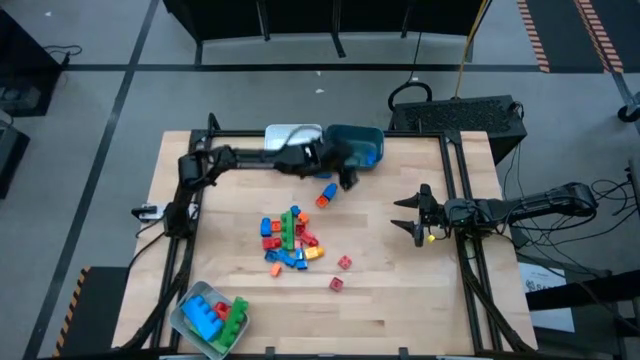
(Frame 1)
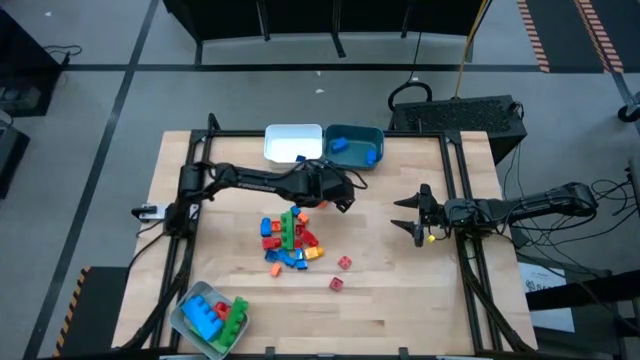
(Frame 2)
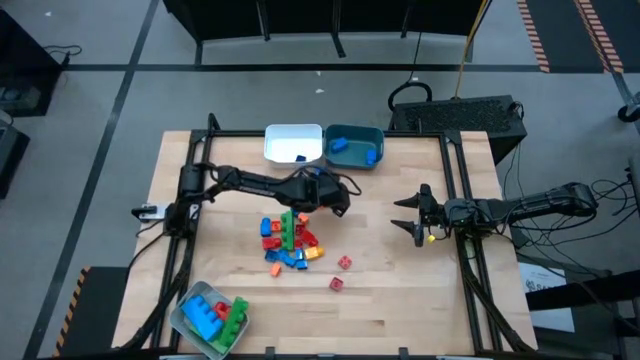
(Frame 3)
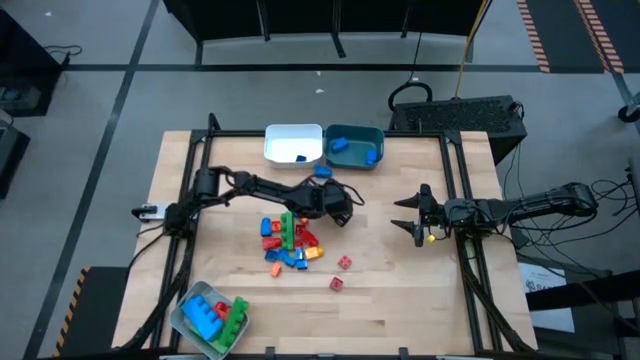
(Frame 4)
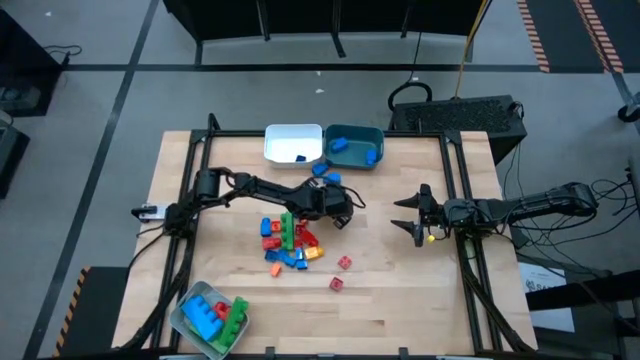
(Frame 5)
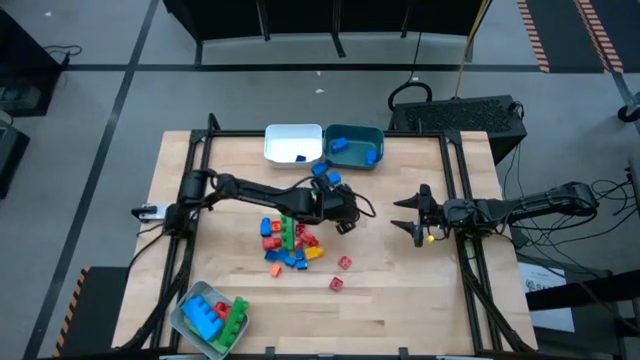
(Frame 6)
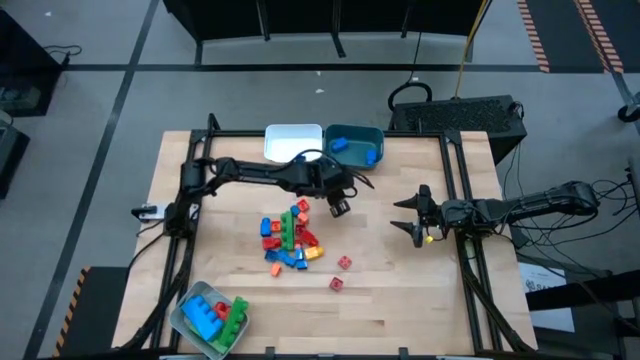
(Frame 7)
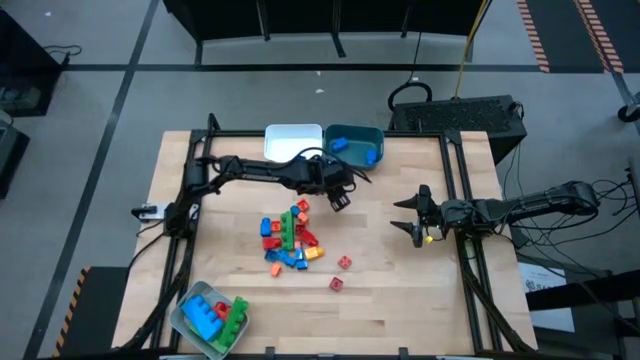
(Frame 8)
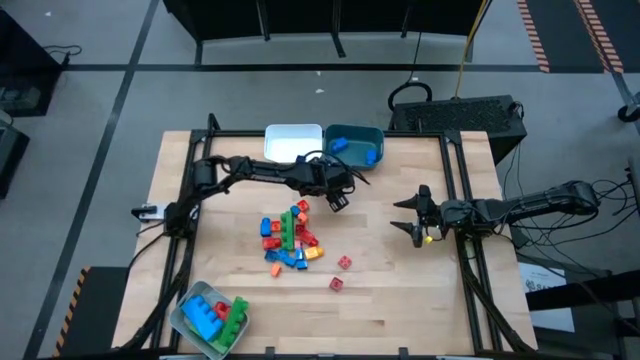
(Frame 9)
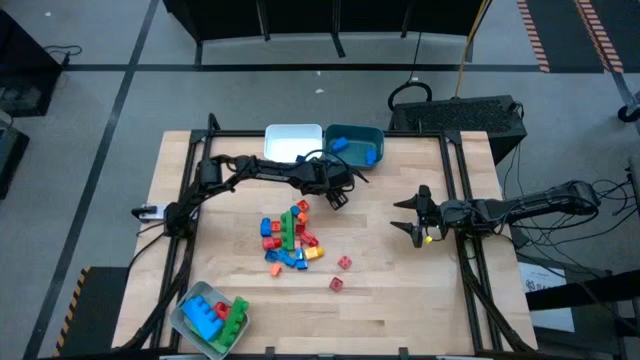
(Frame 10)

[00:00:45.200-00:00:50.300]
Task: Sort blocks by size
Put the blue 1 stud game piece into the blue bin

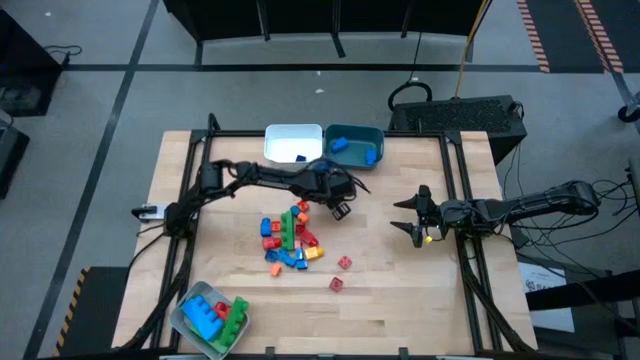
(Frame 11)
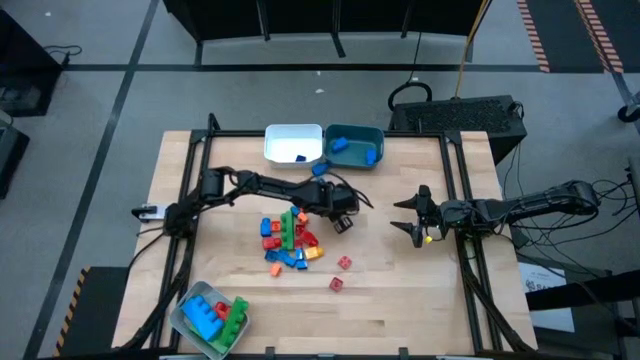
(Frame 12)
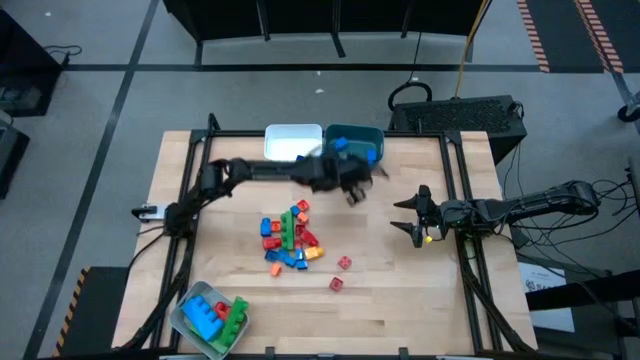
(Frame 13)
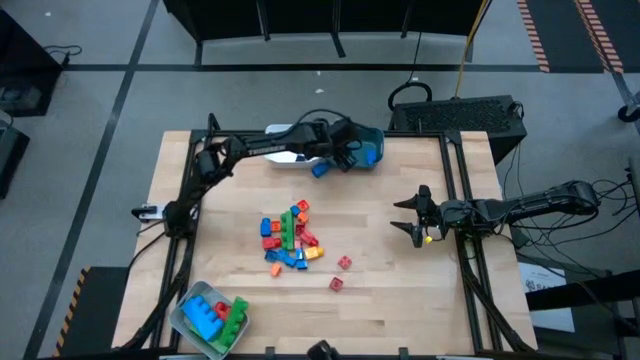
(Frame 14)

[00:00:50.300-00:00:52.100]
Put the blue 1 stud game piece into the blue bin

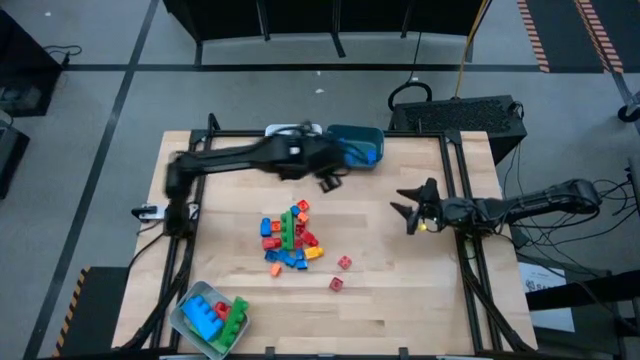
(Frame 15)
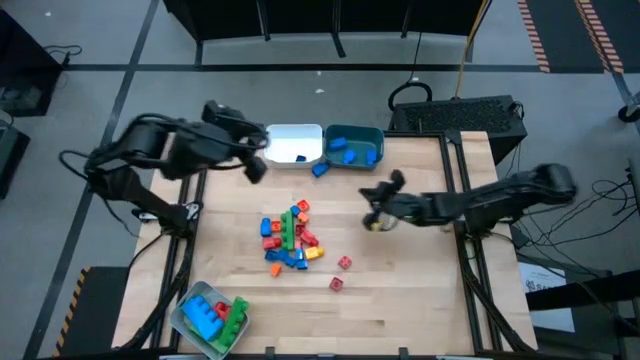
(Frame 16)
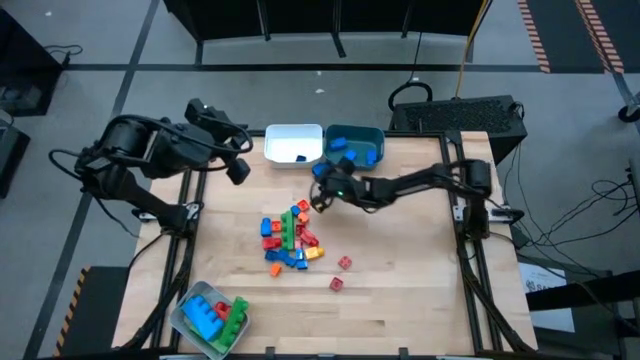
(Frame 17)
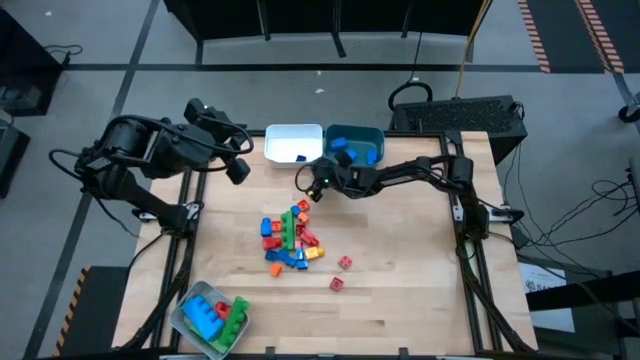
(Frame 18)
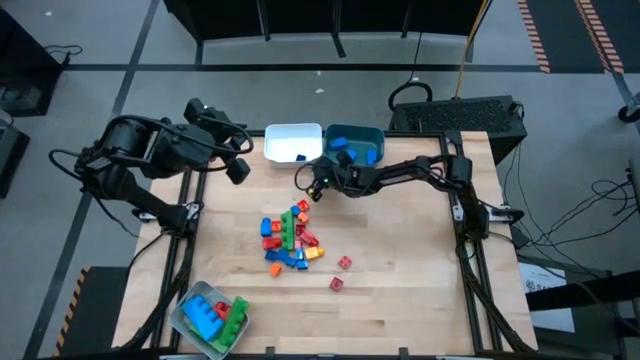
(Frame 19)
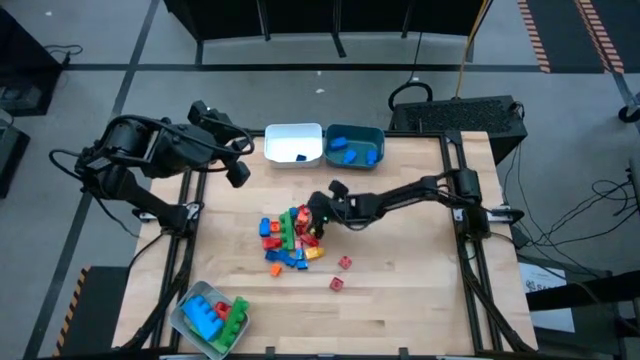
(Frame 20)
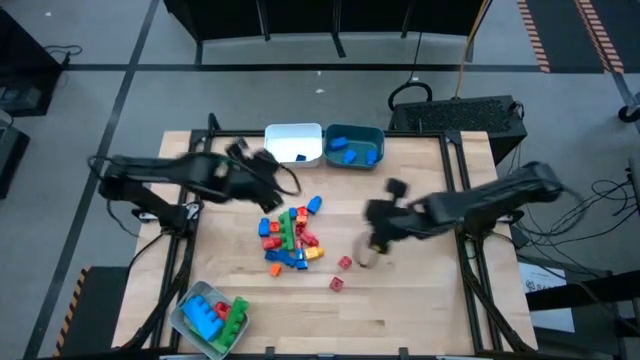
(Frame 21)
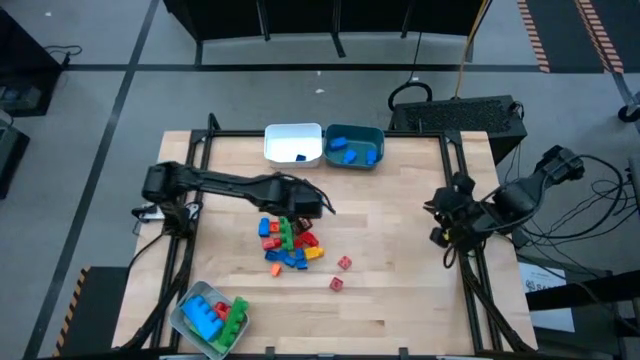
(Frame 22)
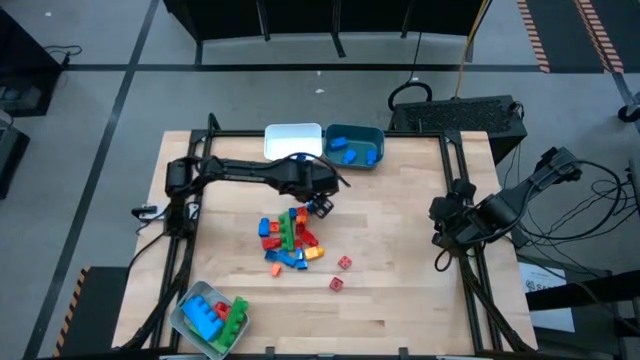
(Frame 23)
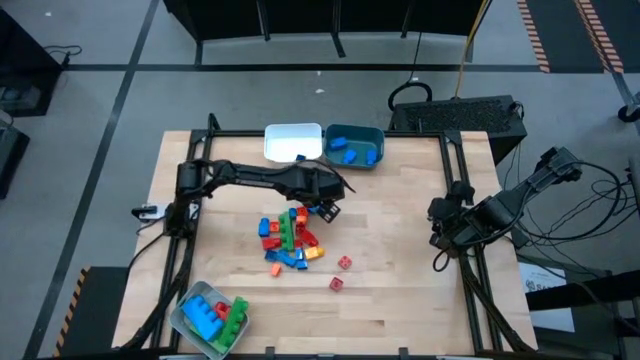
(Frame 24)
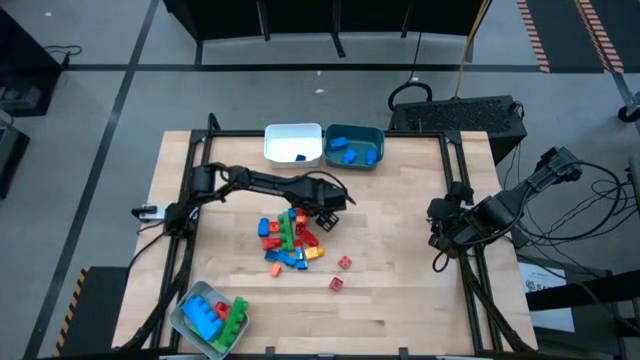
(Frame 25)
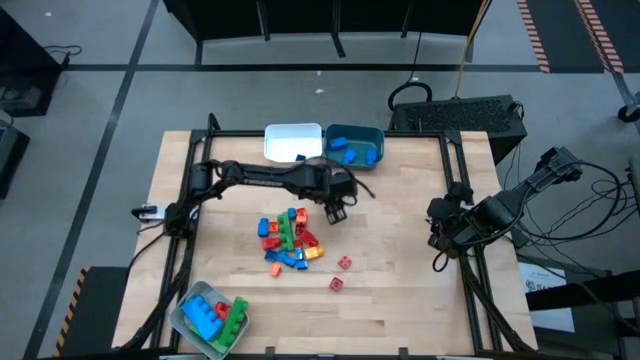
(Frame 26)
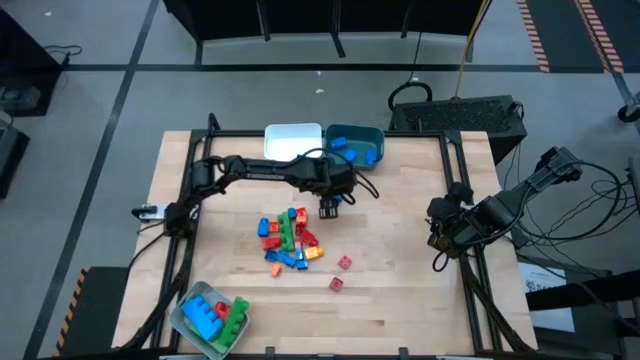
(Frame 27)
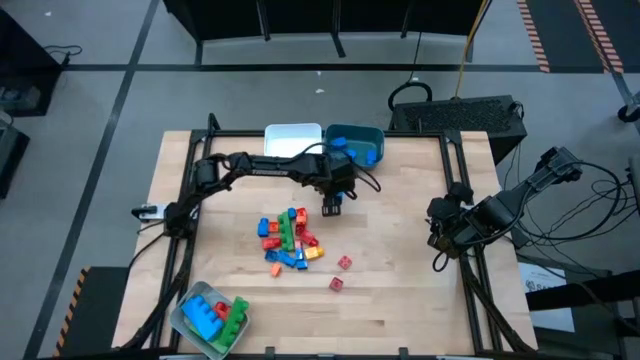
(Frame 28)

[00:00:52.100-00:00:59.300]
Put the blue 1 stud game piece into the blue bin

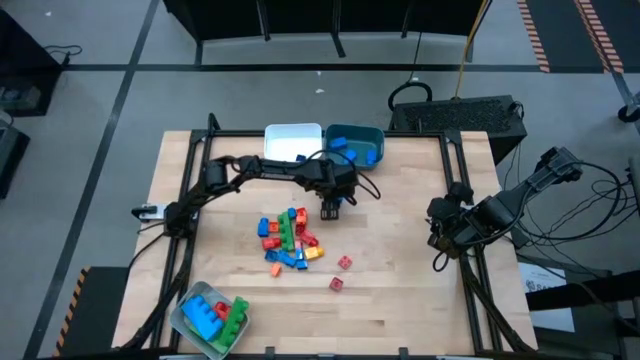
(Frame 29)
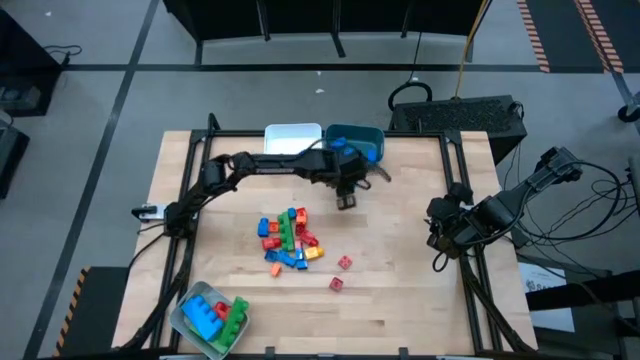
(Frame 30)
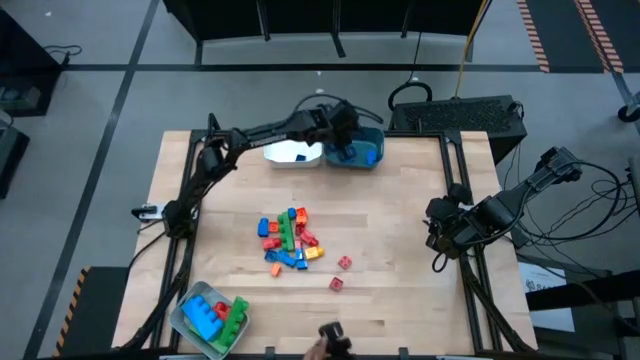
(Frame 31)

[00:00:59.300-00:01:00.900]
Put the blue 1 stud game piece into the blue bin

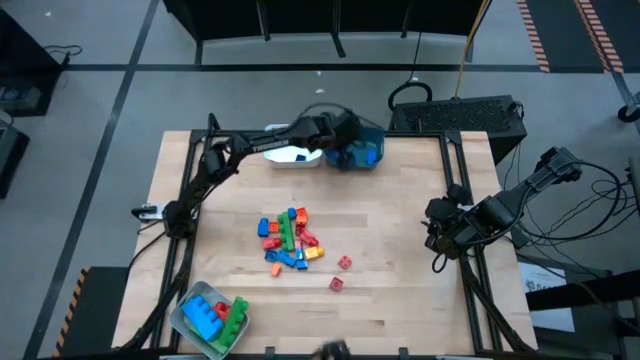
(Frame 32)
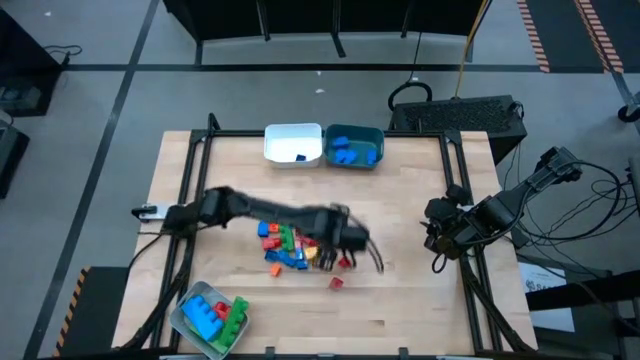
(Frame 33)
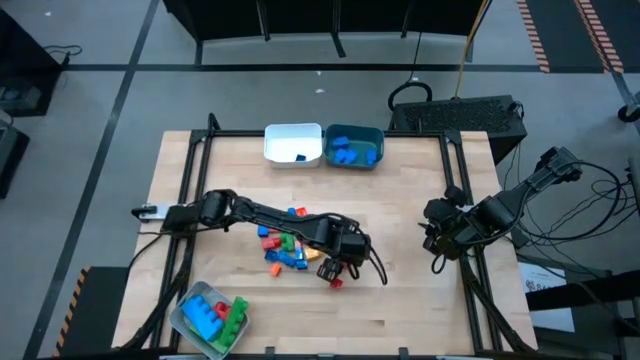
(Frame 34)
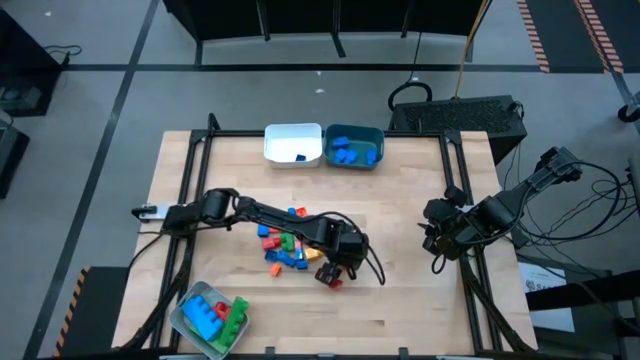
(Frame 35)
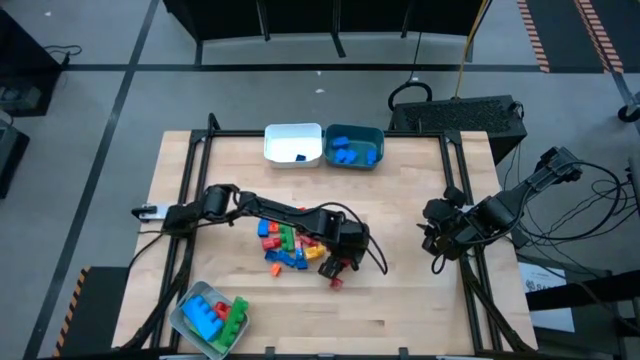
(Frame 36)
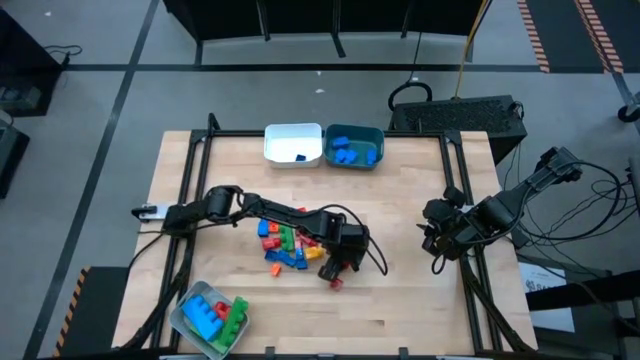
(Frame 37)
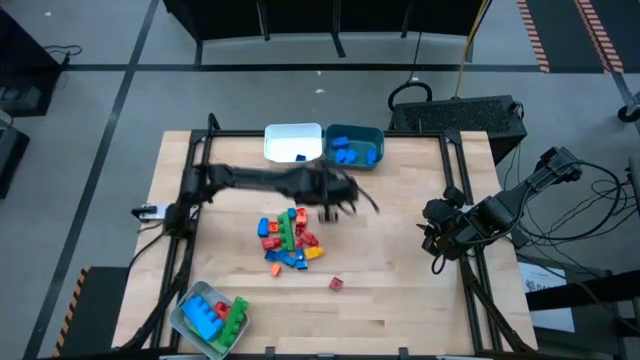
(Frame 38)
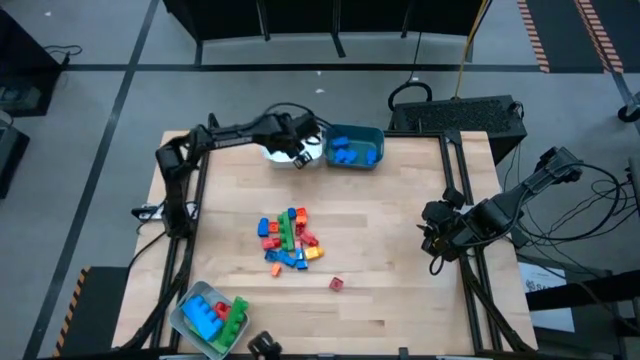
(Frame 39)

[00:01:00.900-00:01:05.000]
Put the red cube 4 stud game piece into the white bin

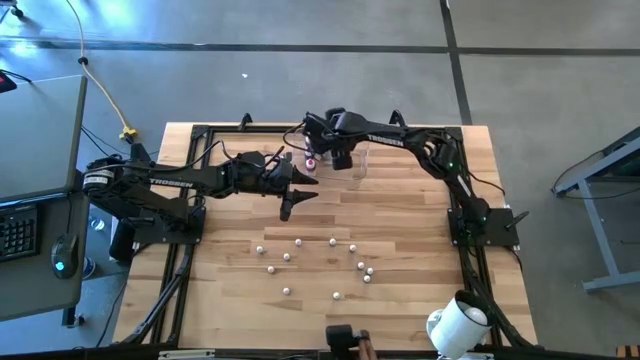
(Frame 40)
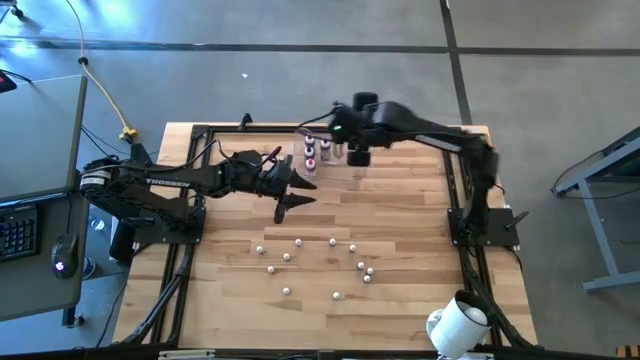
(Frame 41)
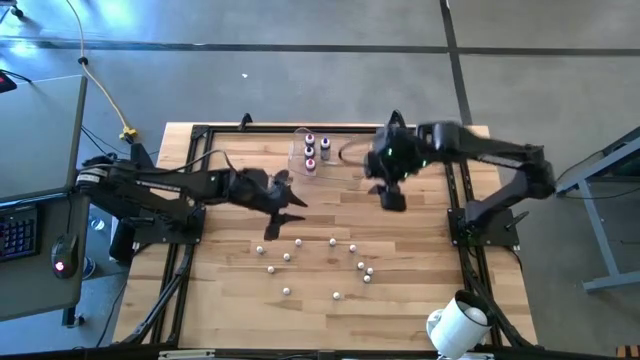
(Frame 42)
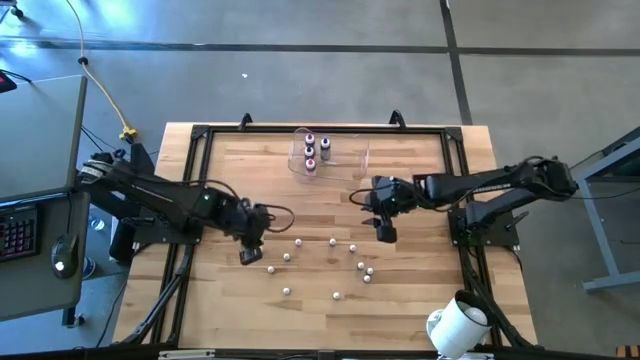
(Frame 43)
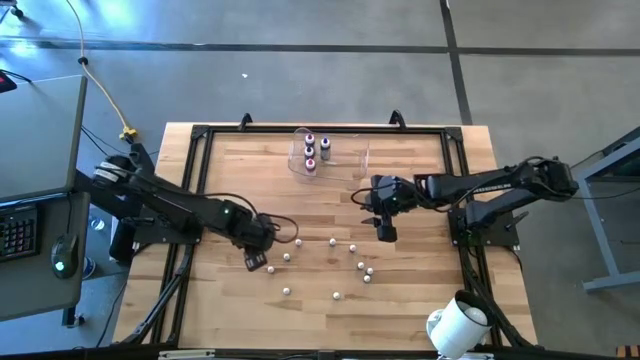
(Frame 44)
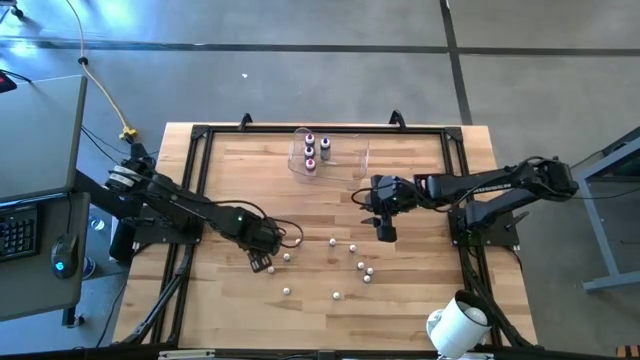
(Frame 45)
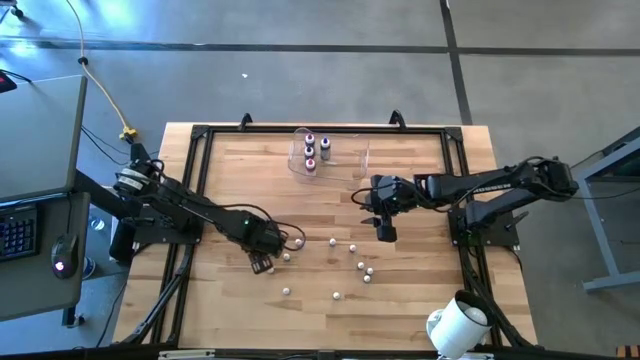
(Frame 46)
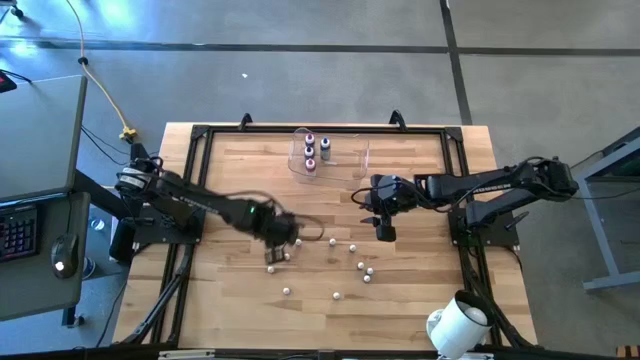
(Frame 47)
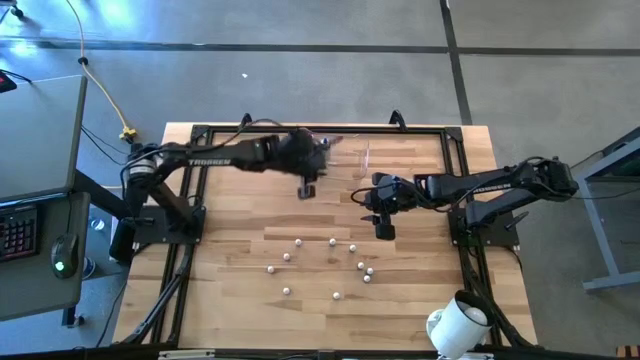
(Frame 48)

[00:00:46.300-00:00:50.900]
Task: Pick & Place food coloring
Put the black food coloring into the transparent bin
